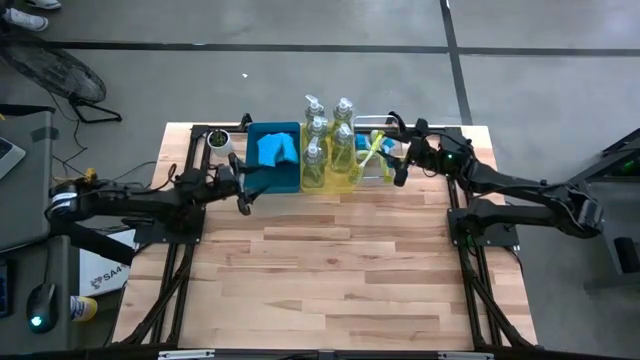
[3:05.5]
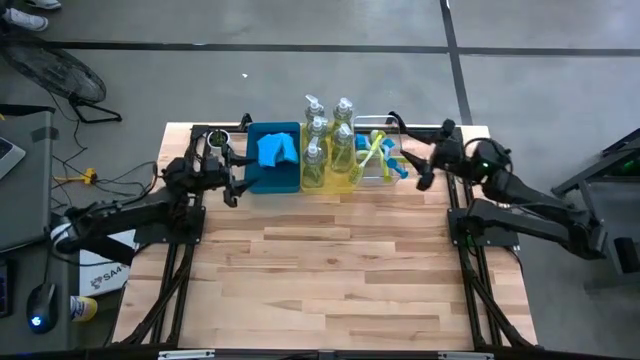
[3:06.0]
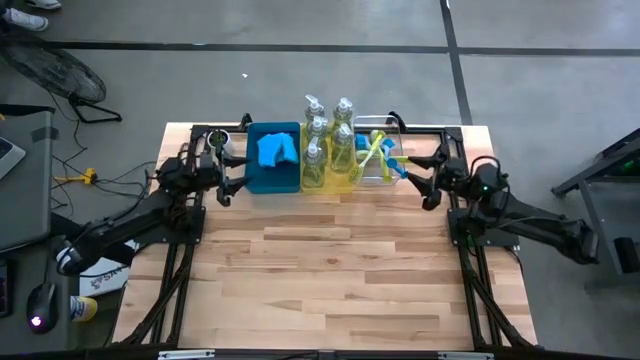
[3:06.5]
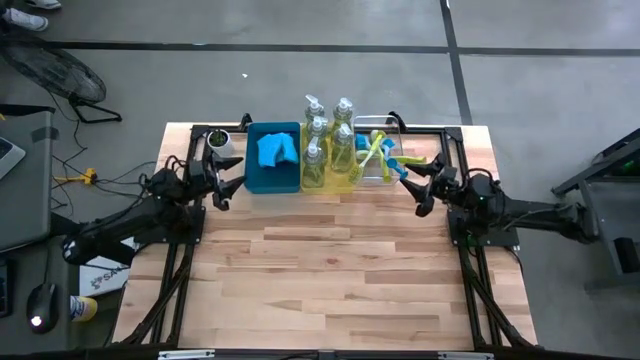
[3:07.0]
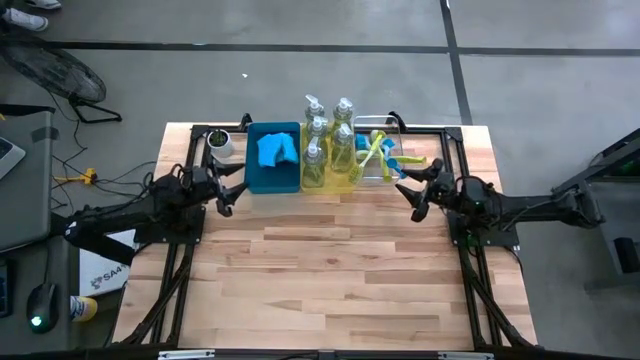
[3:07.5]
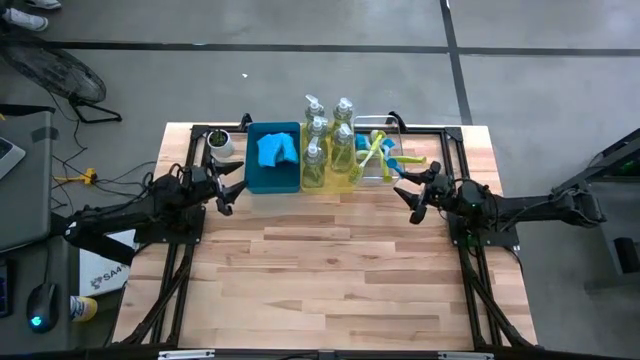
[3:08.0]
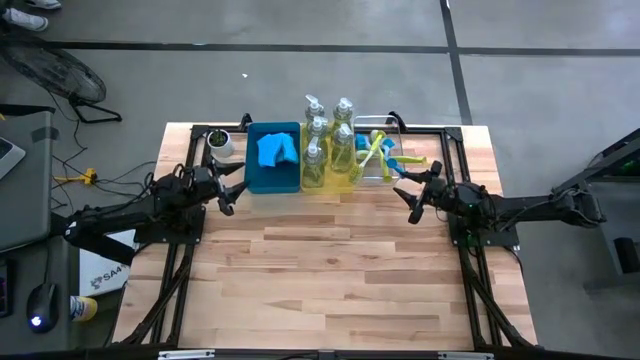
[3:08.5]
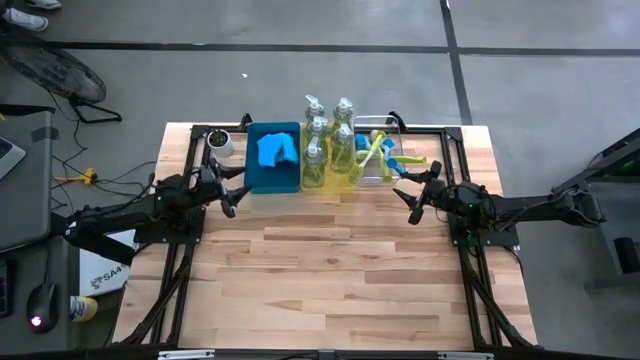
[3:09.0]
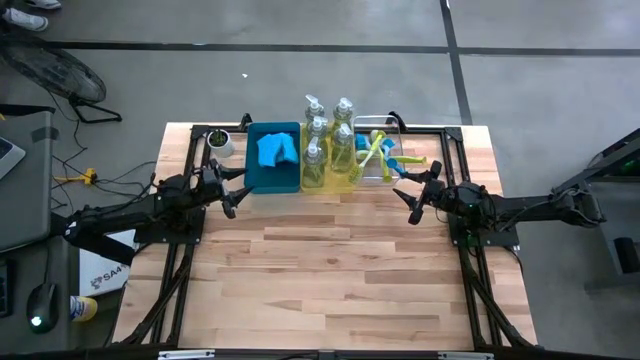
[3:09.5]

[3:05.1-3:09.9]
Task: Pick & Place Kitchen Sink Supplies
Return to Home position
